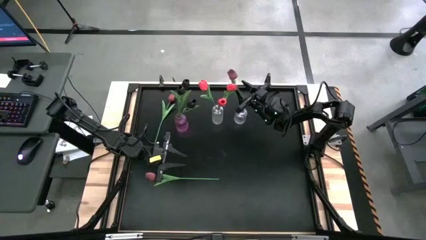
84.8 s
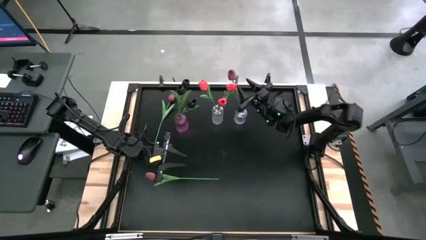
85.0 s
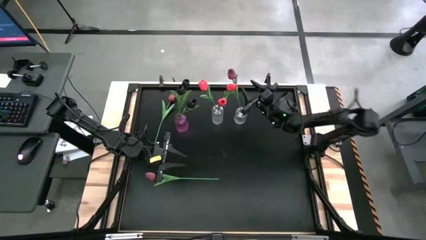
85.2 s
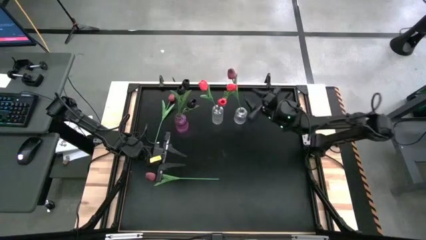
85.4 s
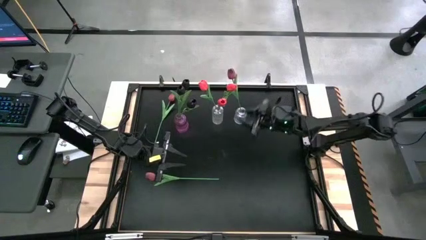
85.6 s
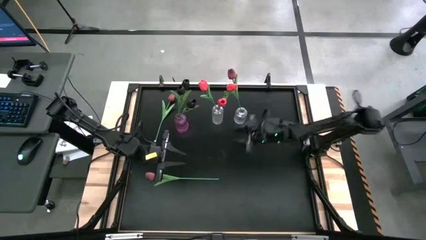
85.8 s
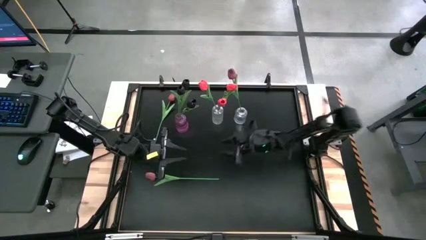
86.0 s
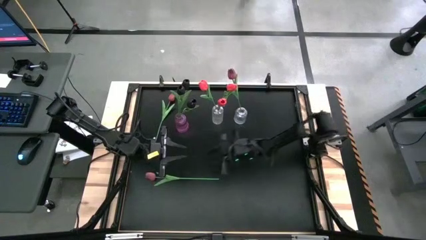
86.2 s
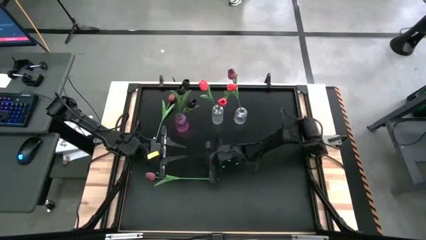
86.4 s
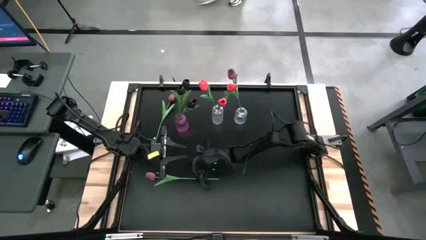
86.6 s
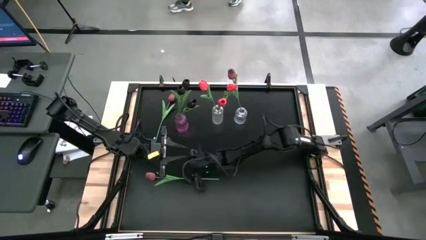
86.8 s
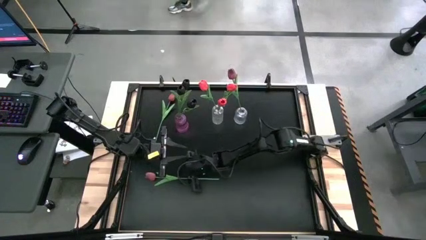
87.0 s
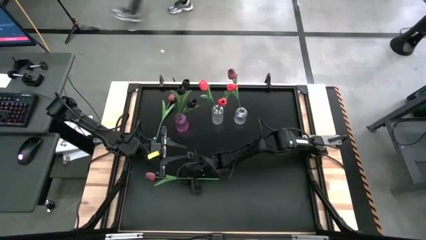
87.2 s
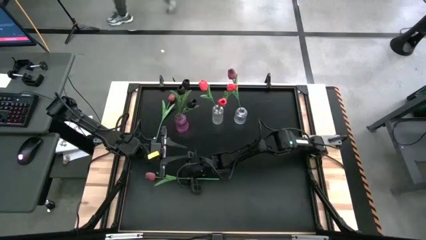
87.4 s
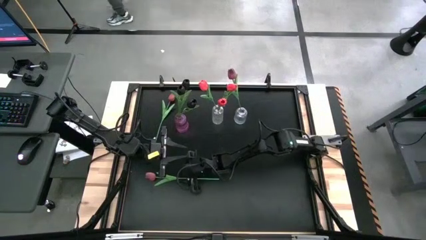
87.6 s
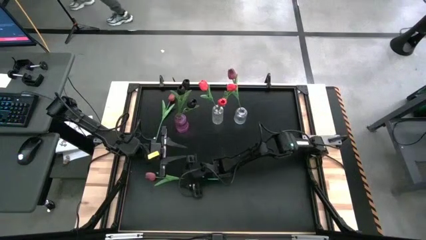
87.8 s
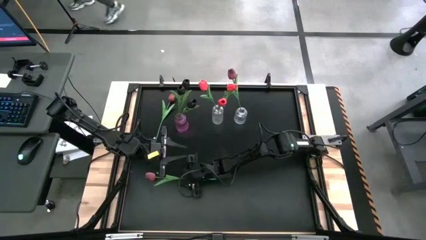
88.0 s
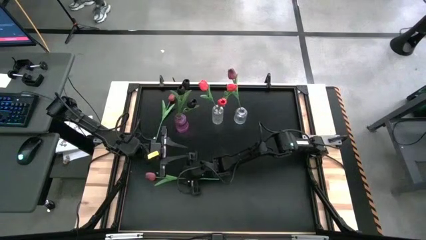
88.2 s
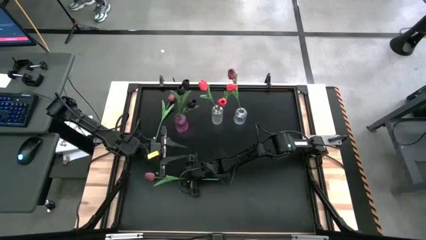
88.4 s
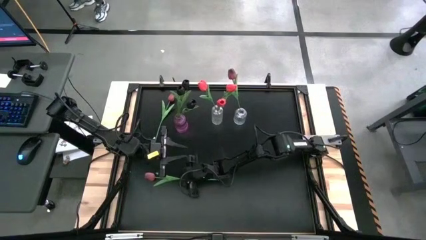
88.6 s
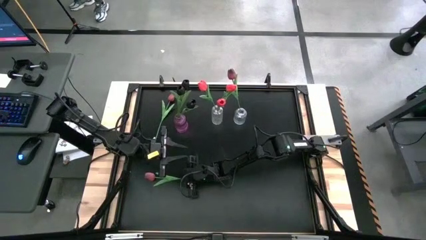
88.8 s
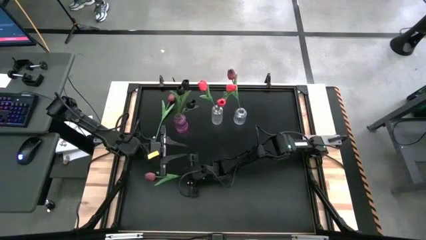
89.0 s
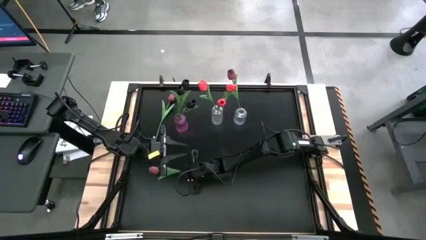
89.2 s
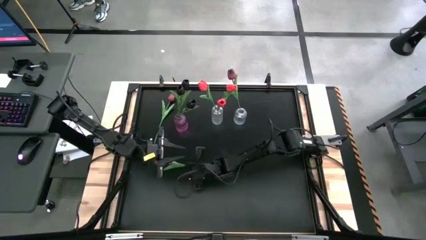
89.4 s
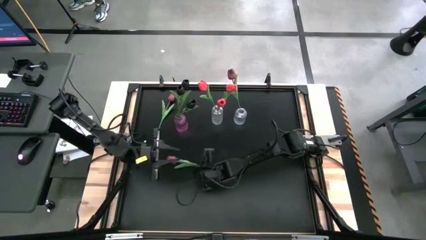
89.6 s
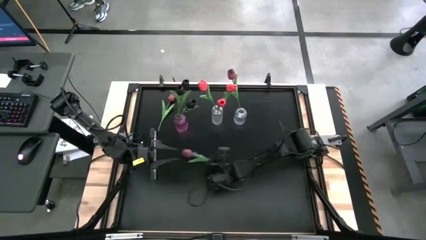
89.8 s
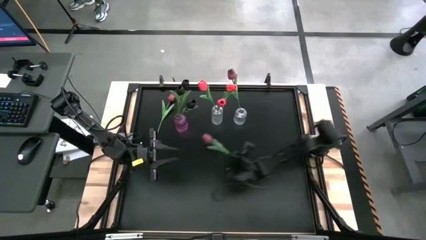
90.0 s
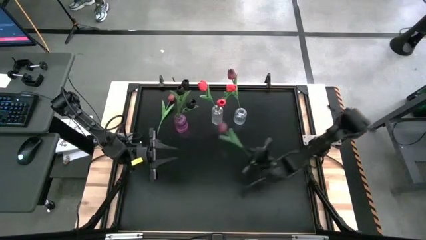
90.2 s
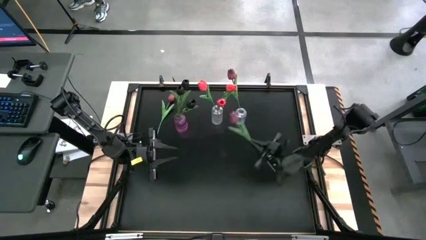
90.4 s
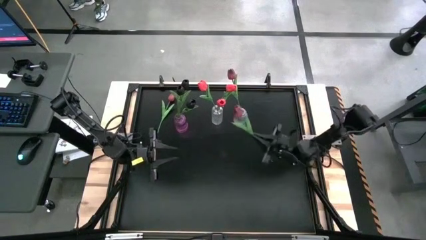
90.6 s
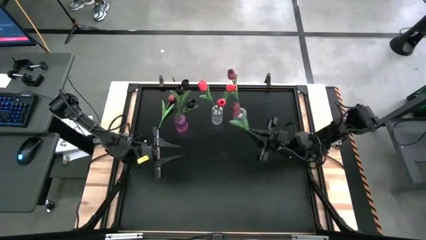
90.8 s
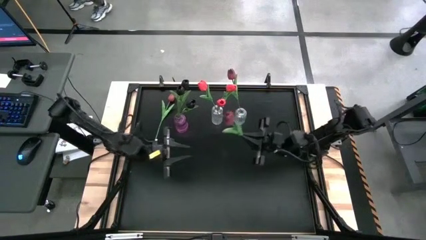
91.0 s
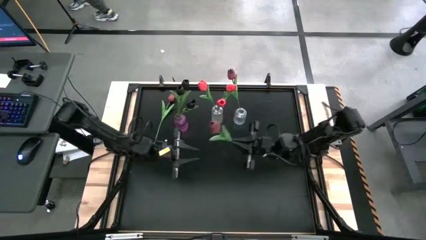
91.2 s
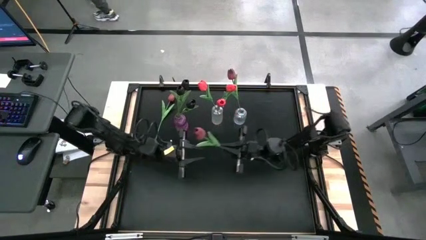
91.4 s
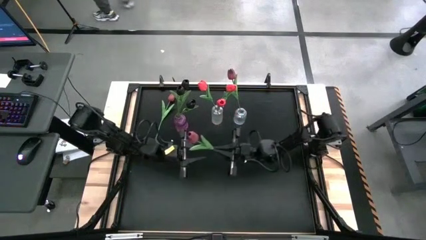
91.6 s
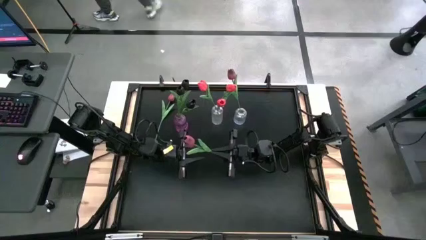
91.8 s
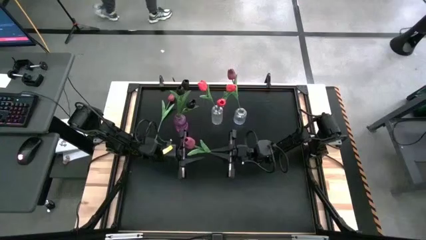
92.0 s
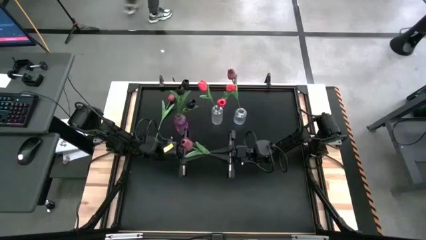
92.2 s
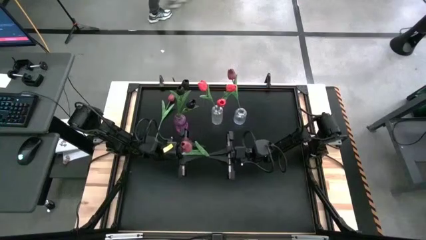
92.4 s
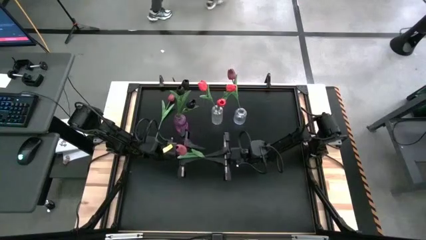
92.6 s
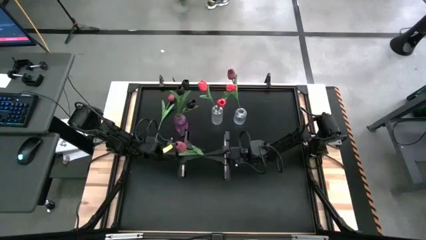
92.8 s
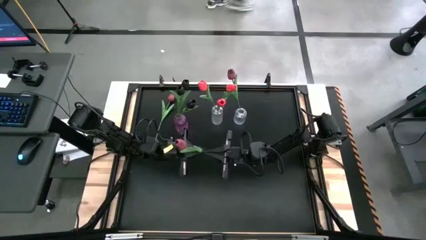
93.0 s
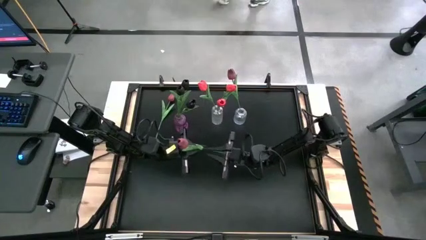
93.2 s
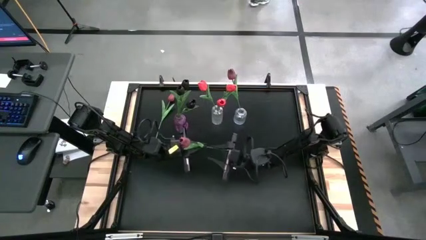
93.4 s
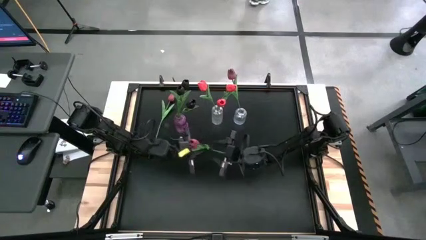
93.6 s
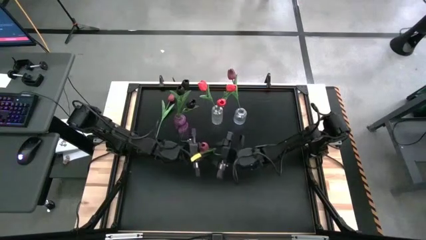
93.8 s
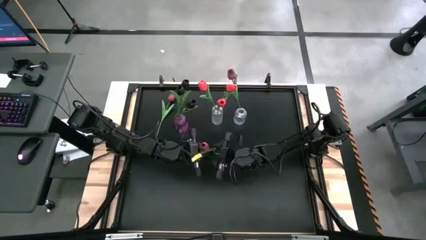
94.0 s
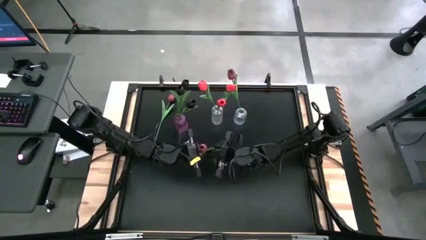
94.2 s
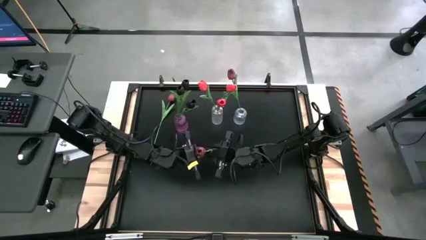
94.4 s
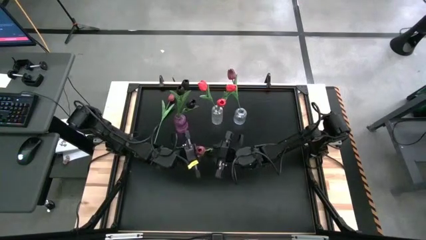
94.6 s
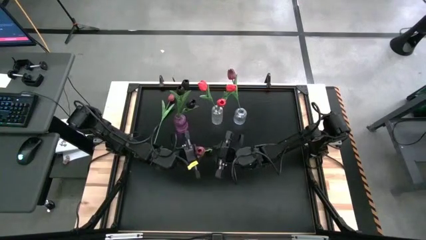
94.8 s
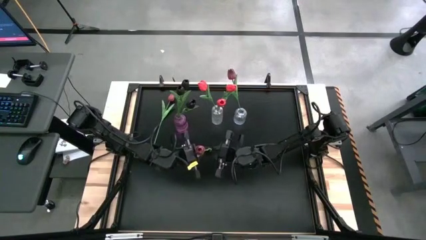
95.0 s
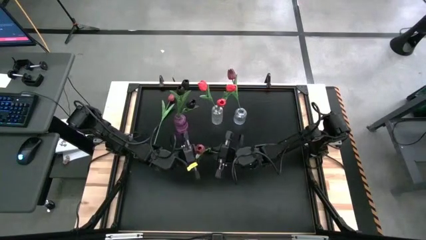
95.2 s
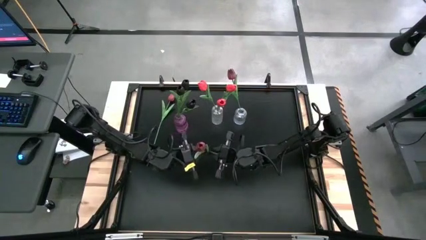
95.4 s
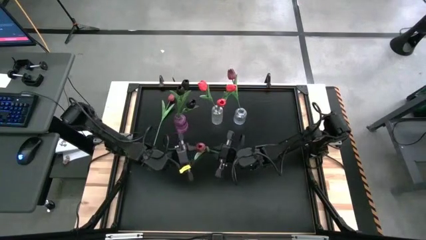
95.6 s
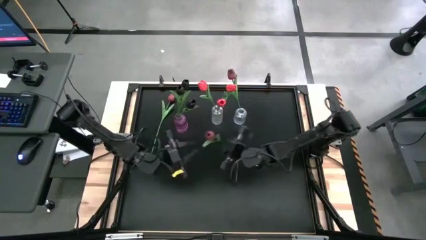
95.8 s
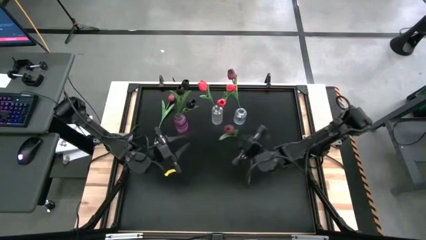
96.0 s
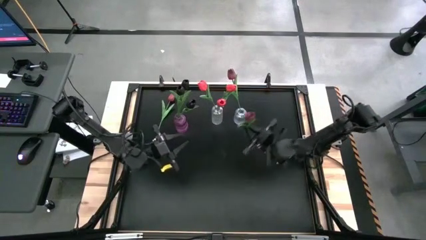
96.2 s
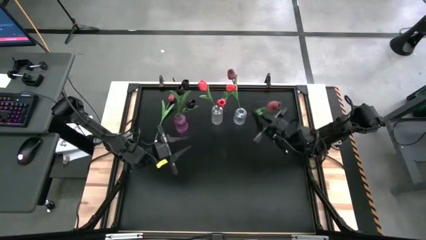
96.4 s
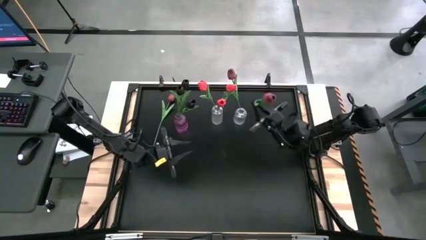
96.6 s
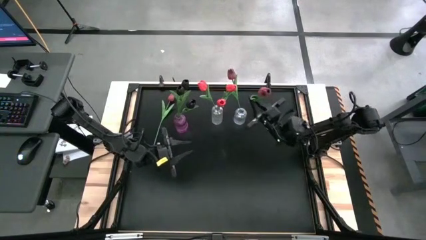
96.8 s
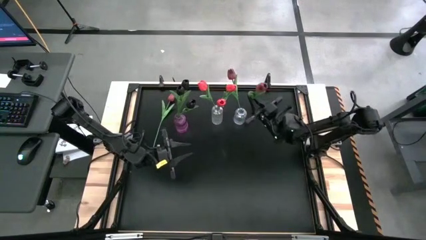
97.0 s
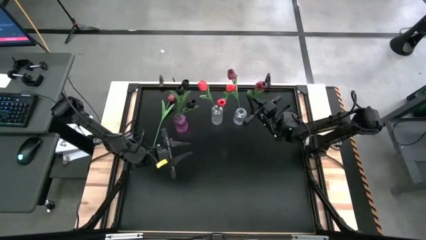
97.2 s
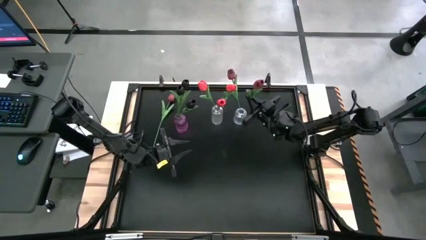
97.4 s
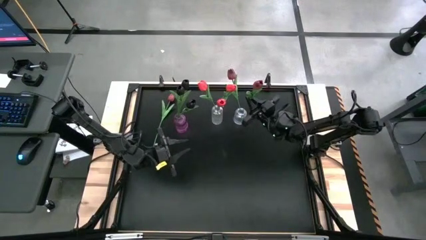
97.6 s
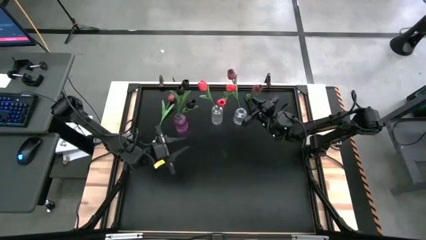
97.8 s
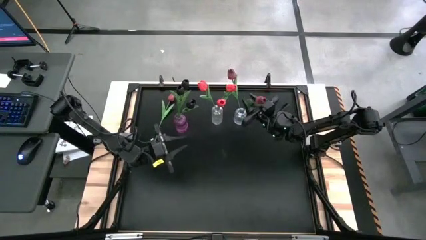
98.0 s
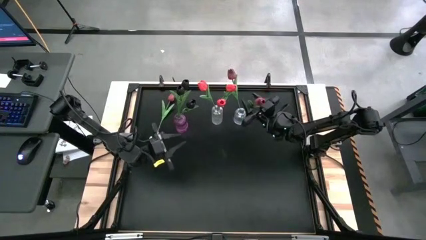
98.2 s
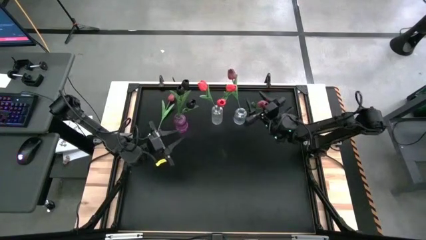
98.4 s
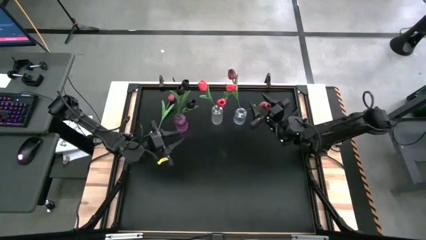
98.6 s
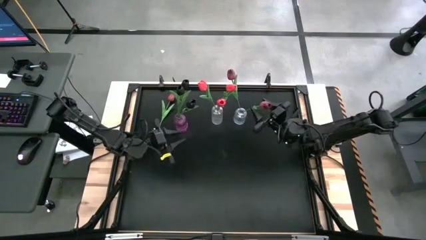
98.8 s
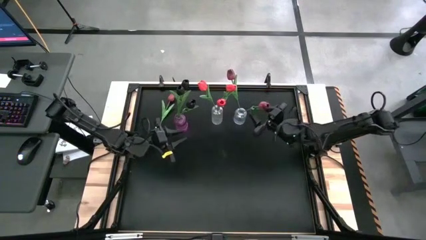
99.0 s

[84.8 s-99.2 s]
Task: Sort flowers into vase by color
Put the bottom dark red flower into the right transparent vase
